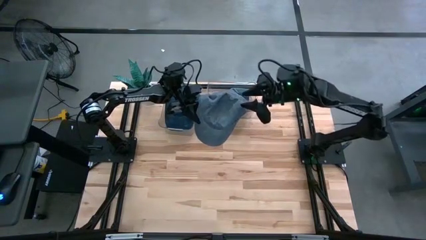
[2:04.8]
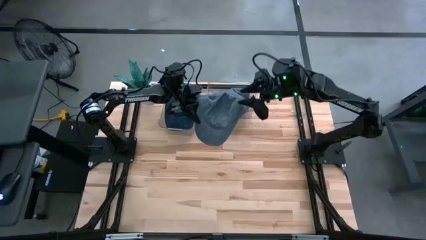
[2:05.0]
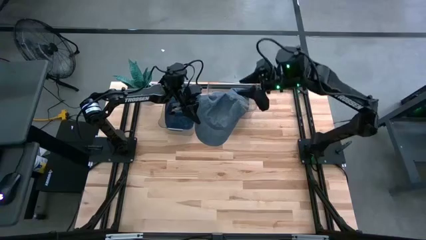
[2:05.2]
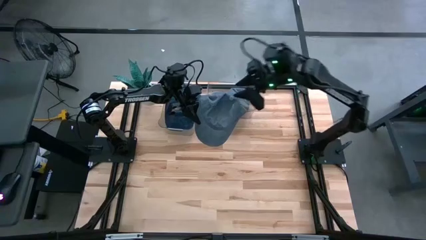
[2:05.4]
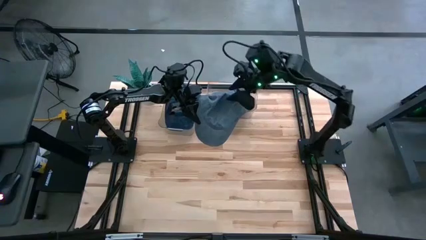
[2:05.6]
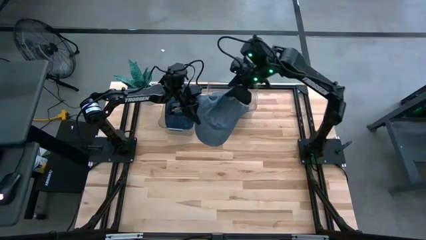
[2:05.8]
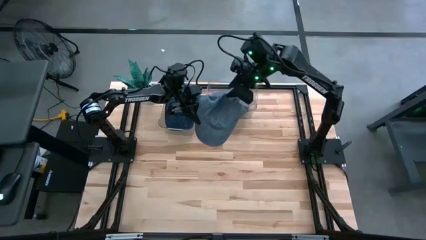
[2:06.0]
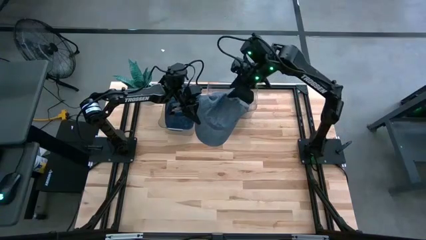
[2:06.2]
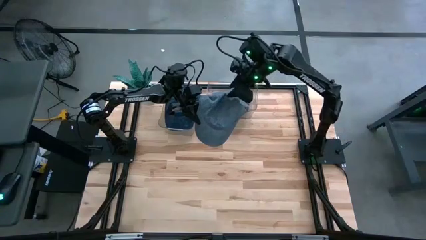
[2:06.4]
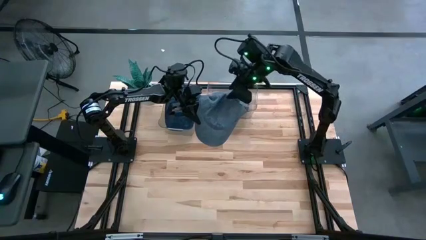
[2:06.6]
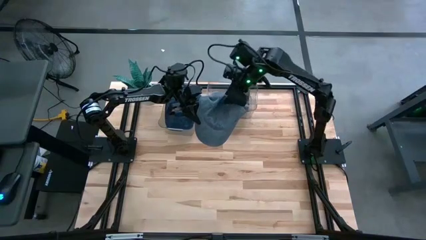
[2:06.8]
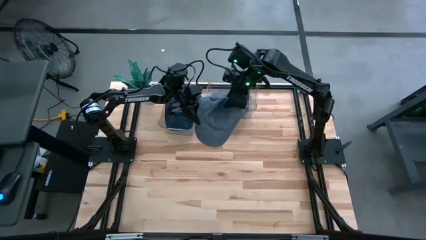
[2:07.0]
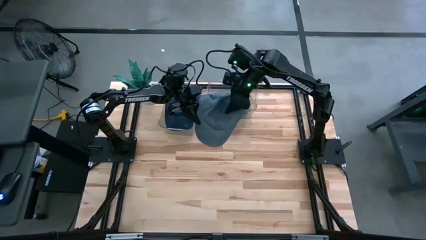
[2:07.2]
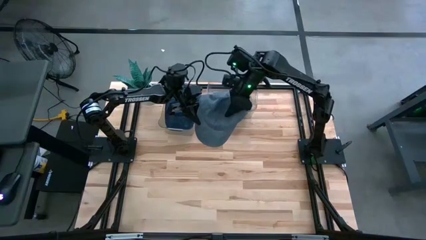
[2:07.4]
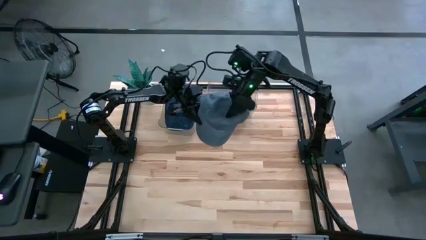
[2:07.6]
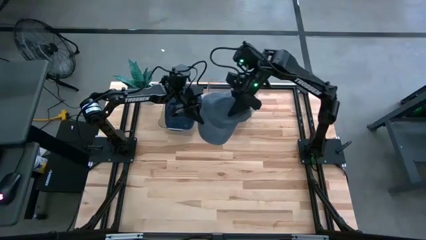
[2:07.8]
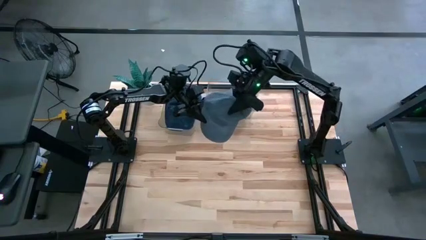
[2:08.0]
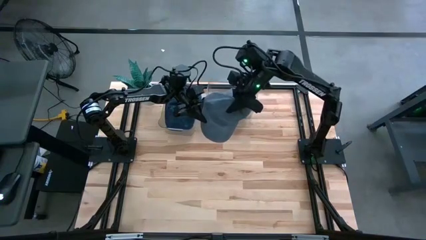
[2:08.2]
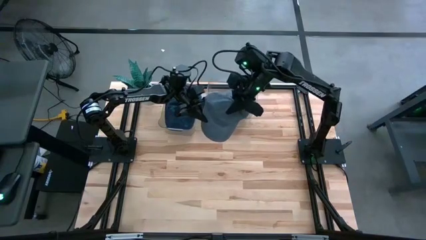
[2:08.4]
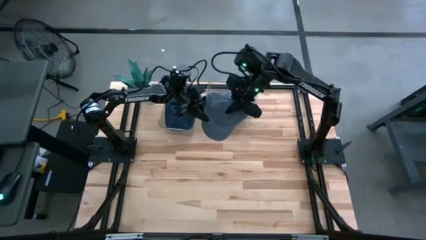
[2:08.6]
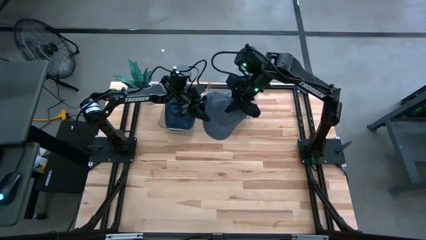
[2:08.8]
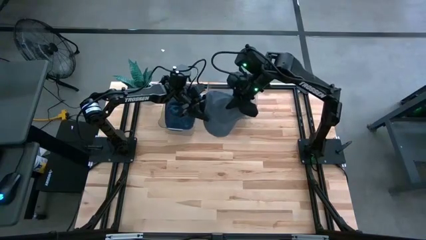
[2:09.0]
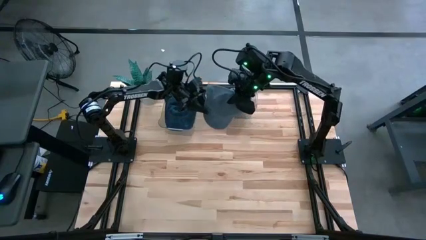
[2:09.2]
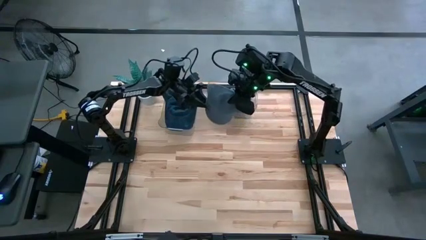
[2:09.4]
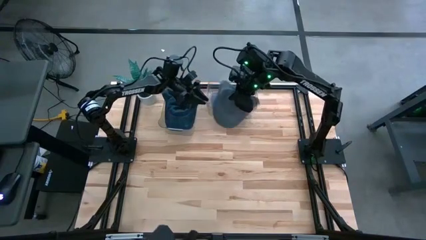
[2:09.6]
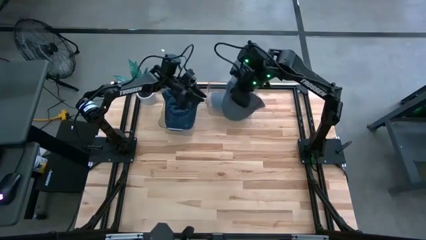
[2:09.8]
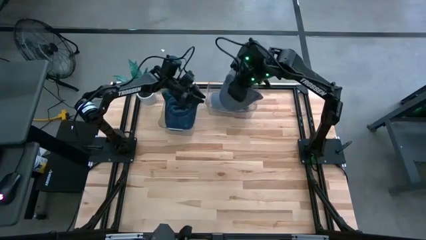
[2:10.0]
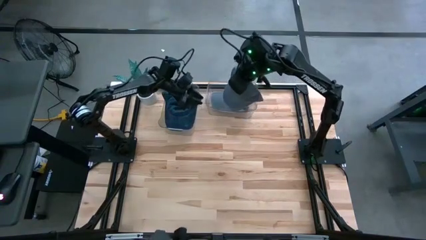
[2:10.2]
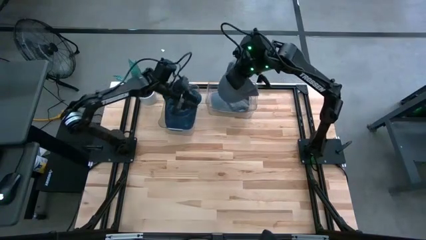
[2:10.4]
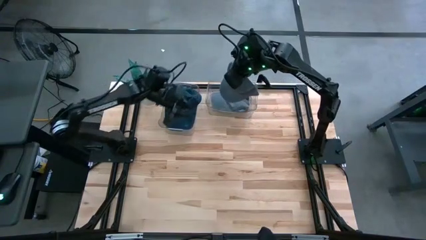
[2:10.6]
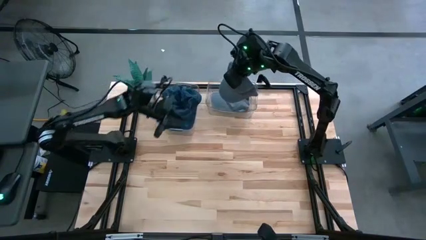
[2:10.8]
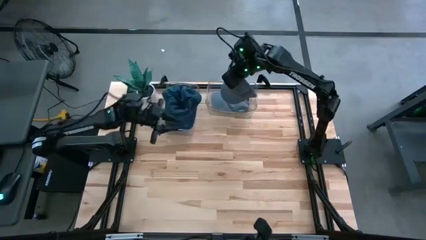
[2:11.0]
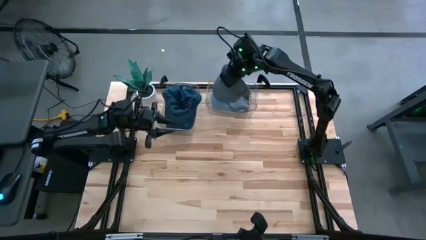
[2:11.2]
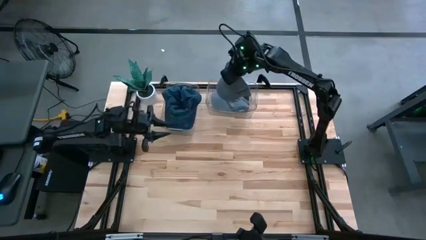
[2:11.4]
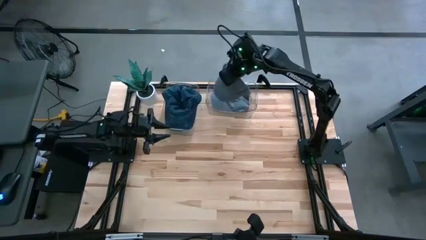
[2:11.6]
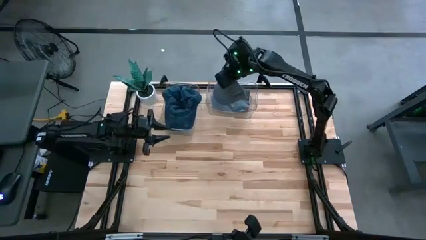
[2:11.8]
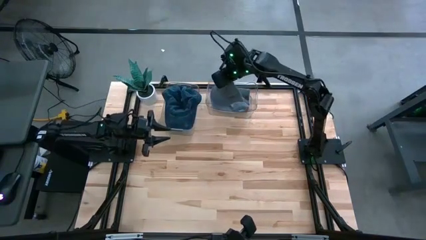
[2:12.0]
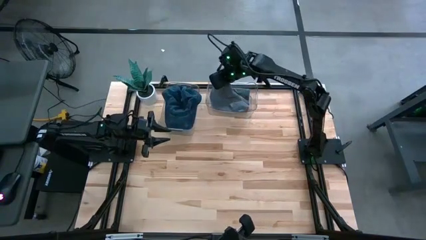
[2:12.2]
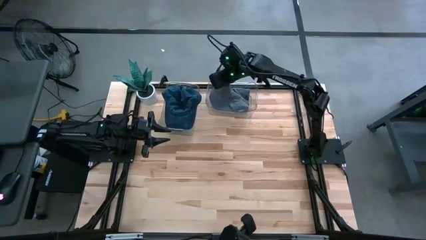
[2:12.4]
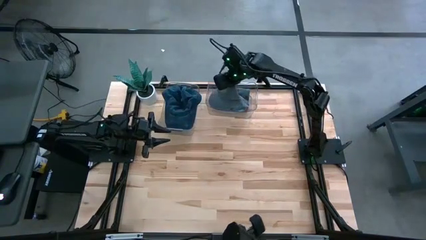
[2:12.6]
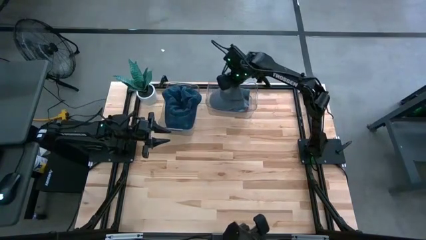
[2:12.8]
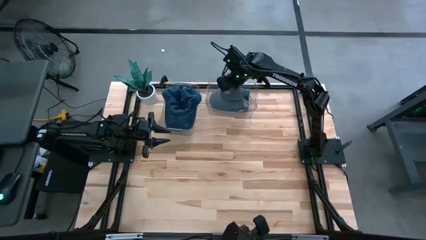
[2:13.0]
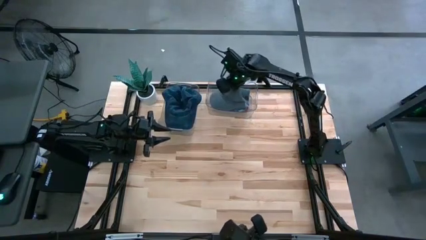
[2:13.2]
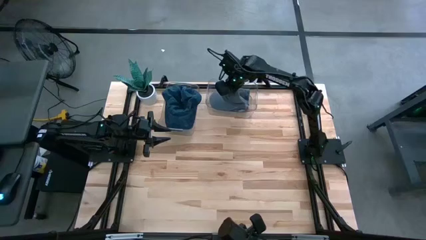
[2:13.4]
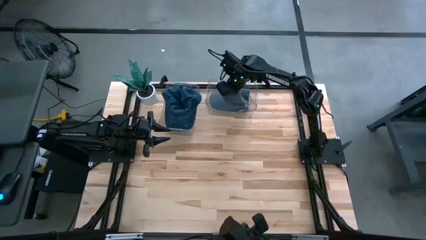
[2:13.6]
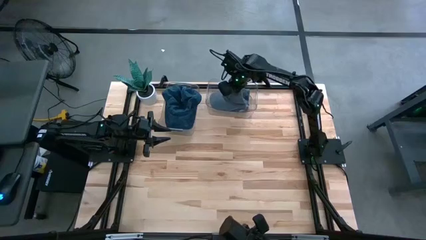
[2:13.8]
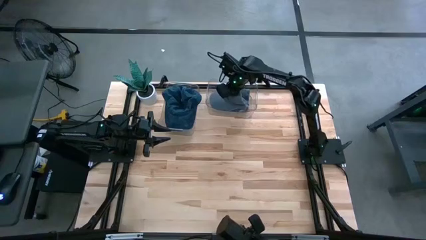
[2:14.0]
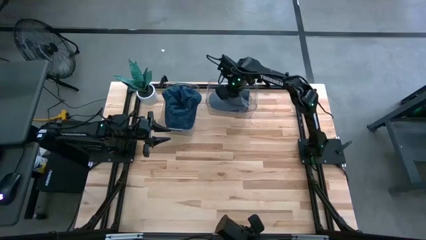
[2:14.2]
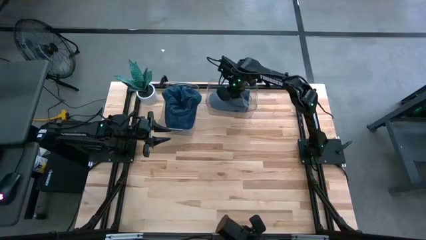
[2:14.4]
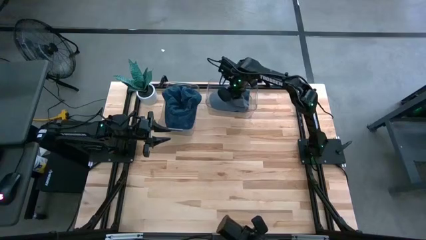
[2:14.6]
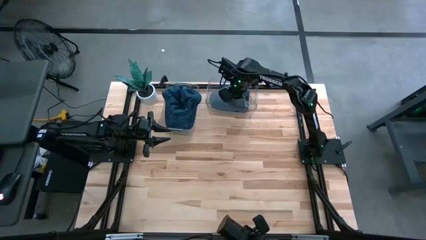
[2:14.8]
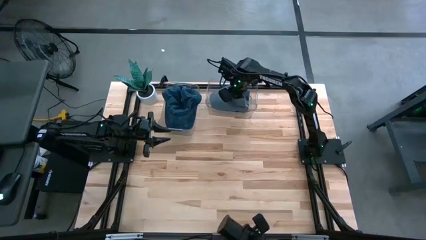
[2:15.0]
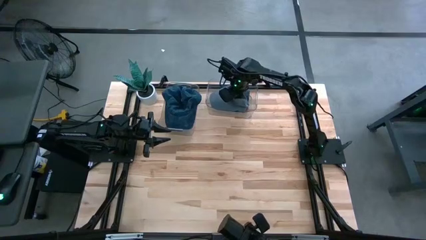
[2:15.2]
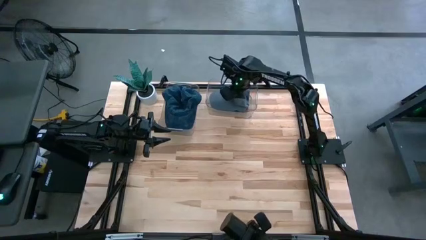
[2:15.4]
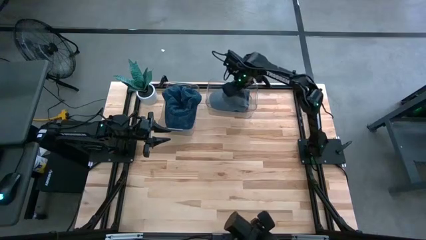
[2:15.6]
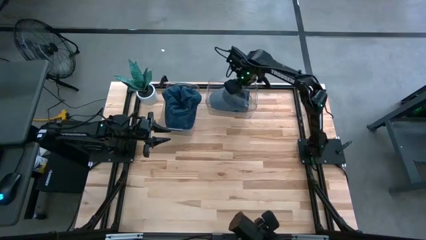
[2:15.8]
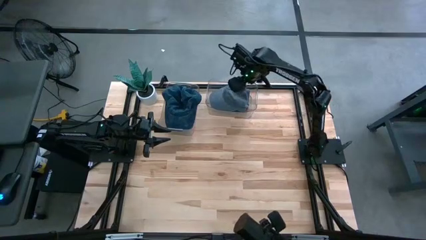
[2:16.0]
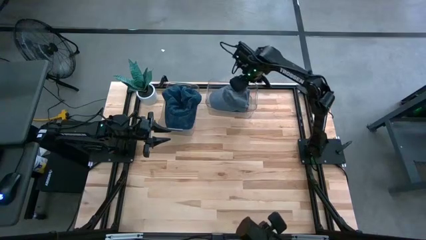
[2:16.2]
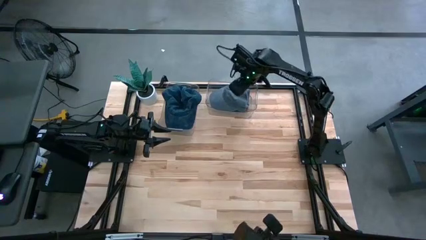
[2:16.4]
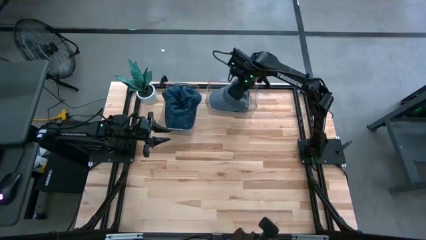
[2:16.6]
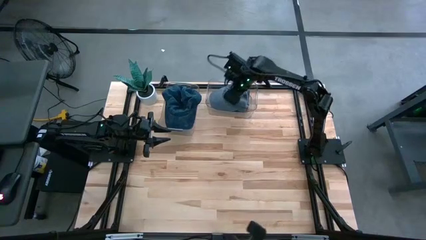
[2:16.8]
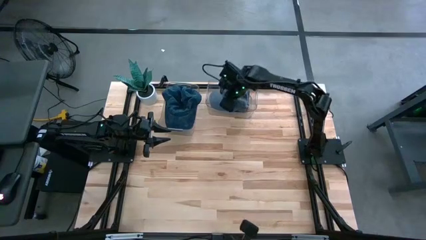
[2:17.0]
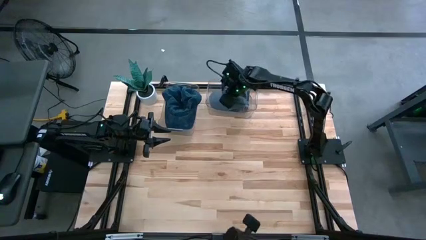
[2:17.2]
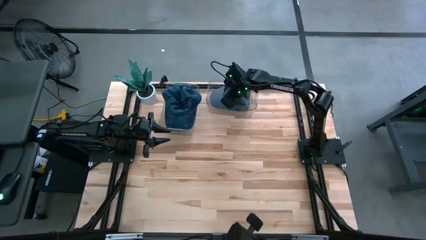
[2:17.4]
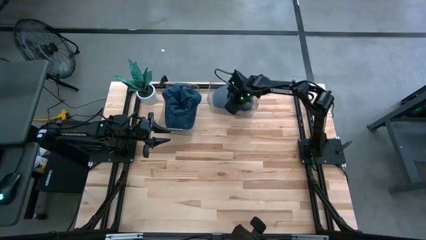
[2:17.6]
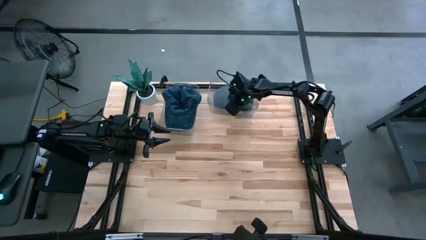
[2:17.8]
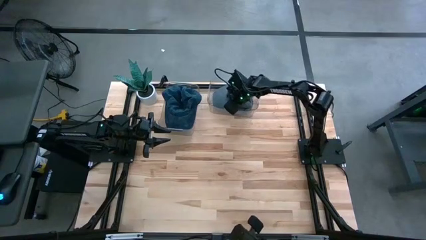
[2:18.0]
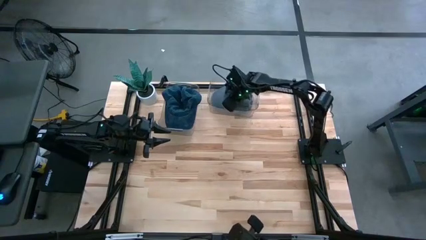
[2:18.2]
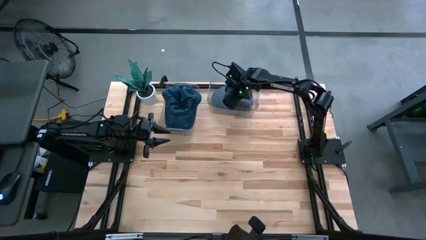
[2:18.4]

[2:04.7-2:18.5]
Task: Pick & Place hat
Put the gray cap into the right transparent bin

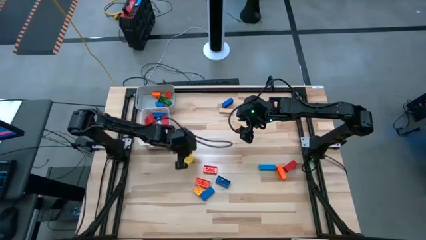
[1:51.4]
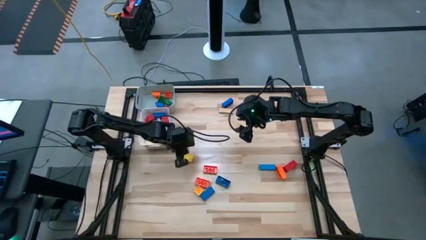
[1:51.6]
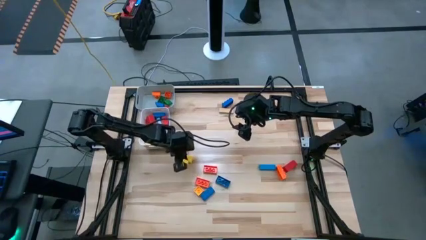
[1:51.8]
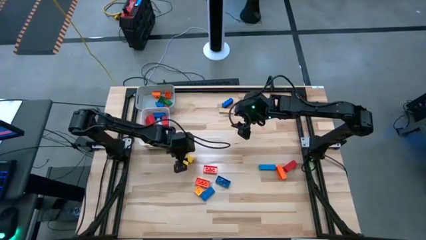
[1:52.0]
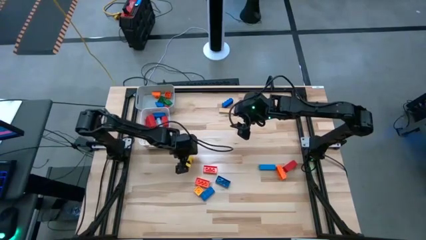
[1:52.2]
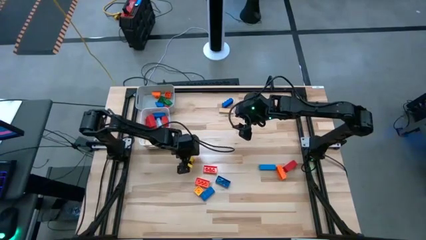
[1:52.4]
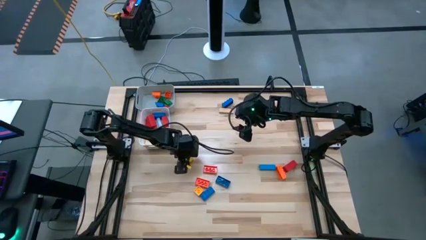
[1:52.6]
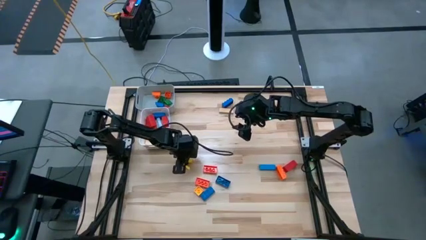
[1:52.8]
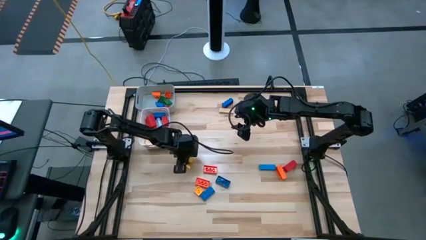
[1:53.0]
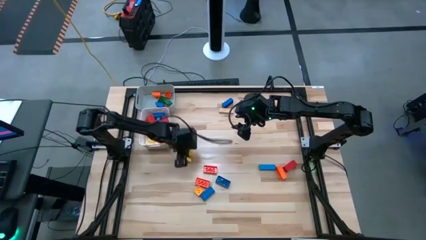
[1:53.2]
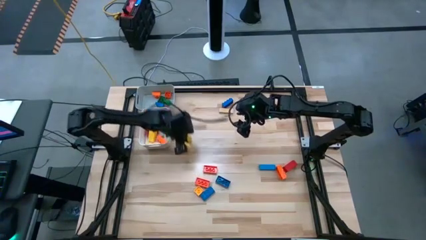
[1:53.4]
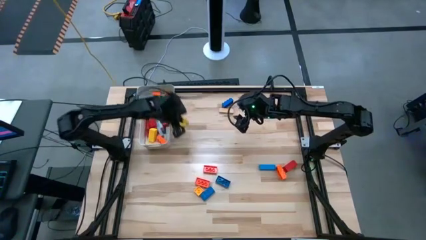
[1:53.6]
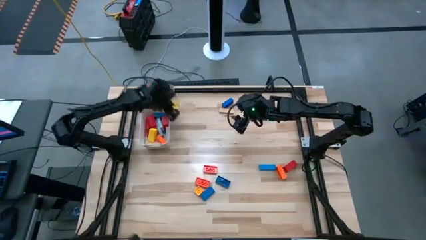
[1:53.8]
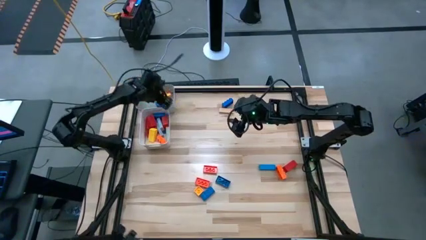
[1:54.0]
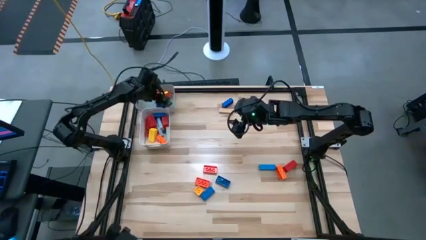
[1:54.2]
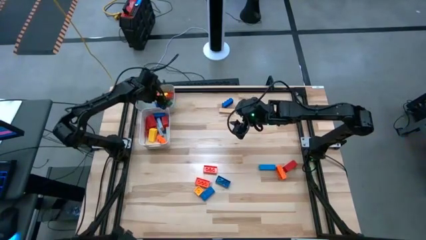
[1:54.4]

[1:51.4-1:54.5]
Task: Sort blocks by size
Put the small yellow wooden block into the gray bin

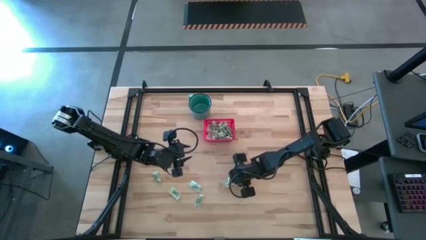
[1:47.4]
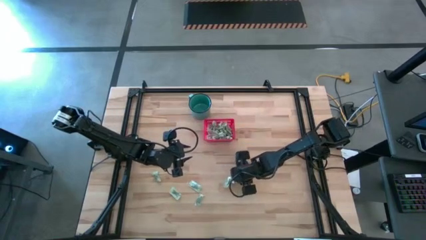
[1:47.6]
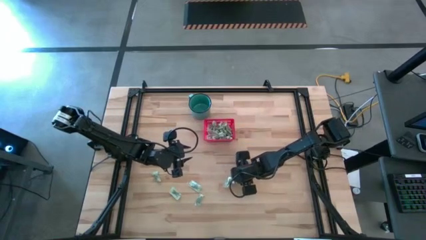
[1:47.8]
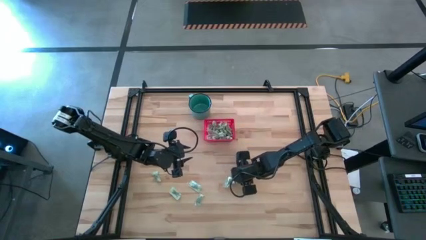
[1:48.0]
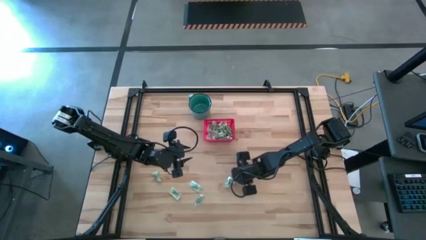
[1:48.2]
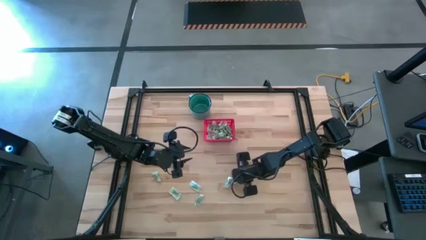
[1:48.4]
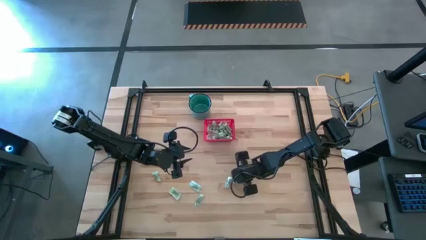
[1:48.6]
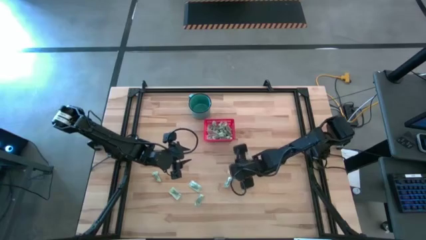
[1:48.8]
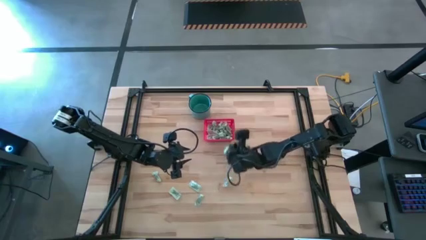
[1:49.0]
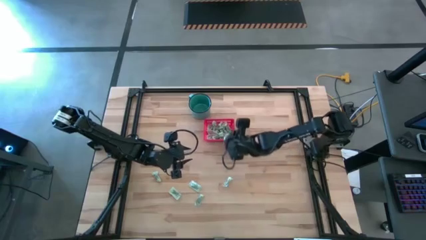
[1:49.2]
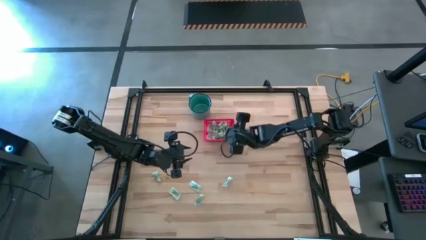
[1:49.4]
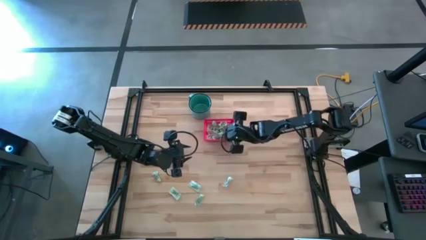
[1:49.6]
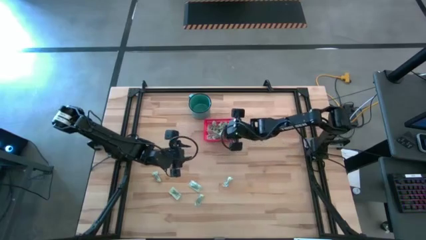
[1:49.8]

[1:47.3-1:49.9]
Task: Pick and place items into bin
Put the light green stevia packet into the red bin
